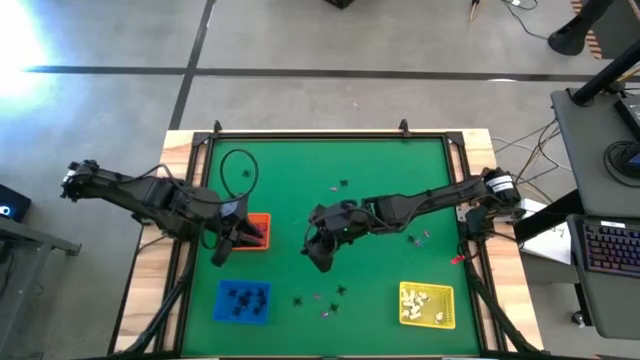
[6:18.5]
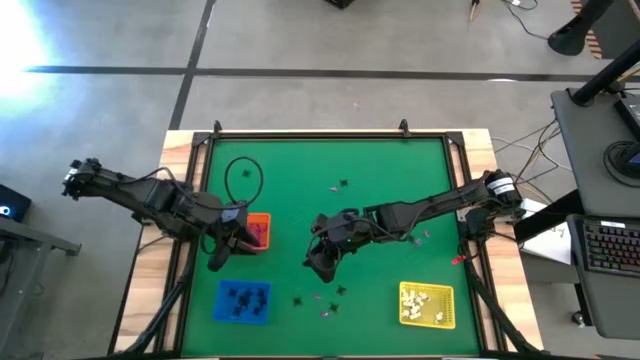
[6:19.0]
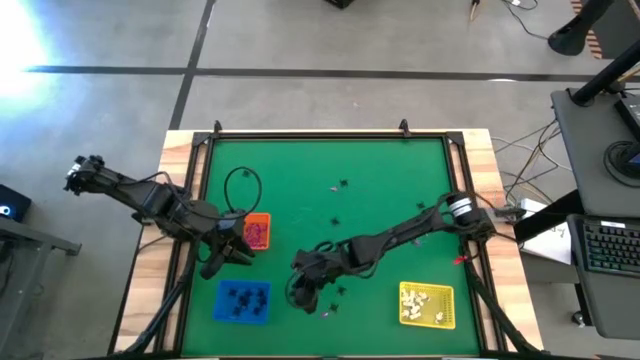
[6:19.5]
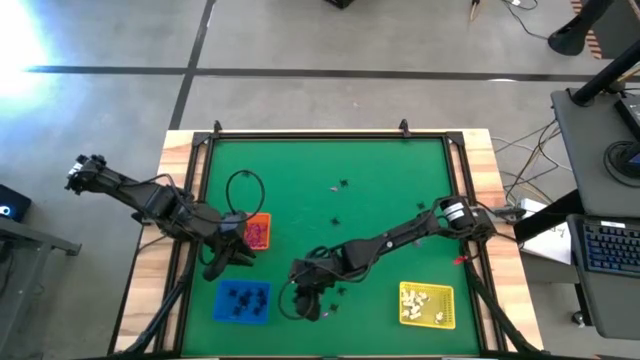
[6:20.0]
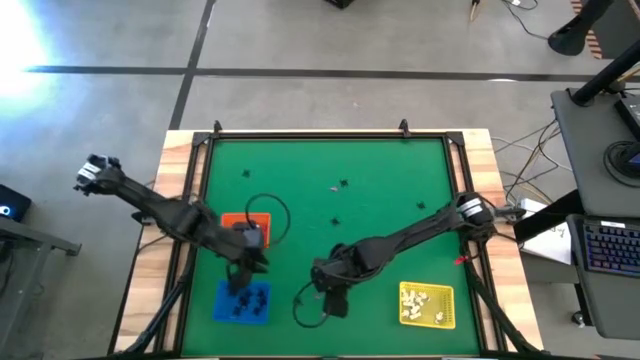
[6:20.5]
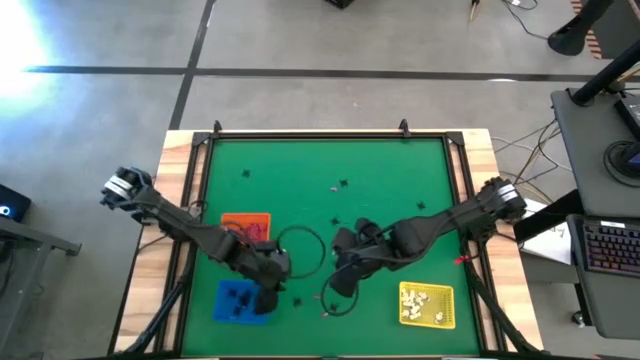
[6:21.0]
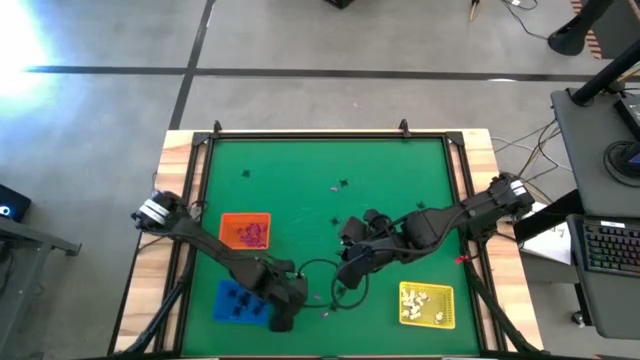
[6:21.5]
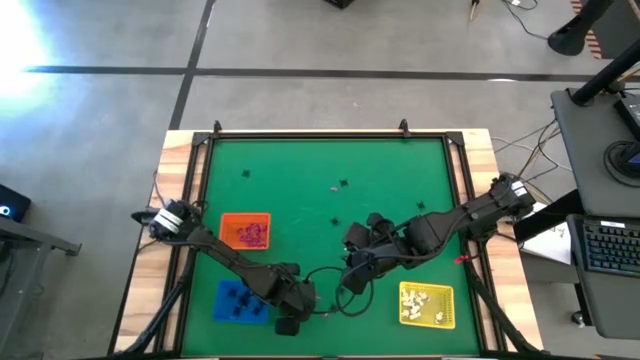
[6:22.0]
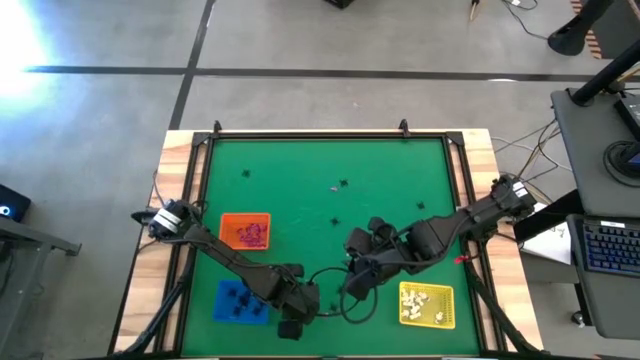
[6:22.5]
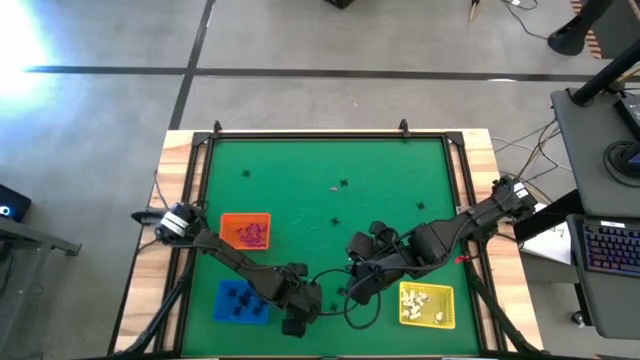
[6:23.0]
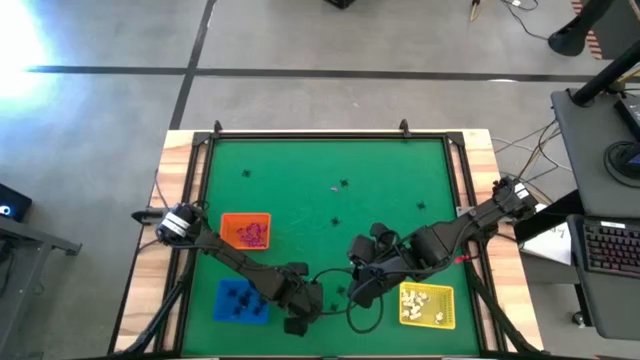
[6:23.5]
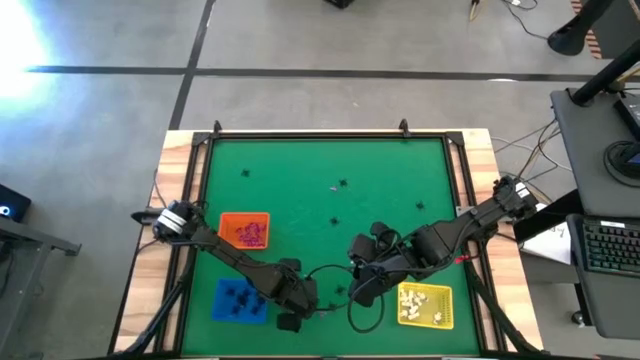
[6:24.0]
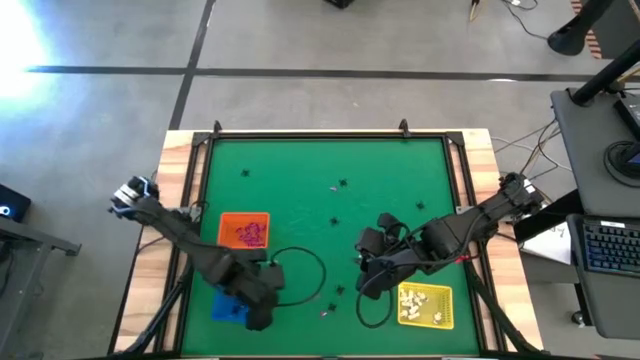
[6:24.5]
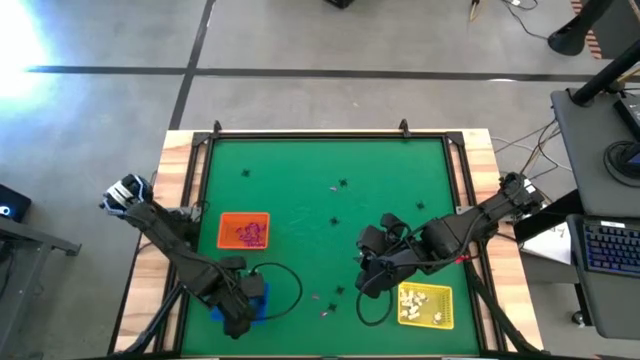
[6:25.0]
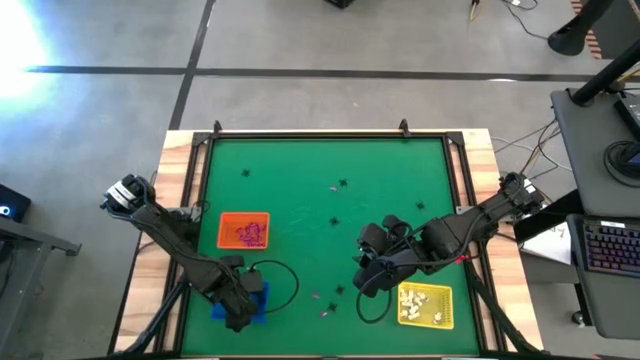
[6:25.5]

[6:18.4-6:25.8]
Task: Sort Halloween decoration
Put the black spider toy into the blue bin

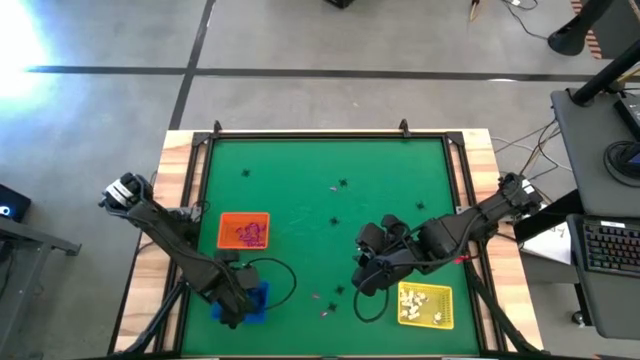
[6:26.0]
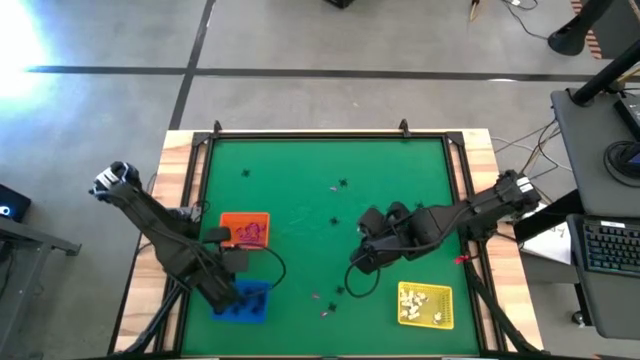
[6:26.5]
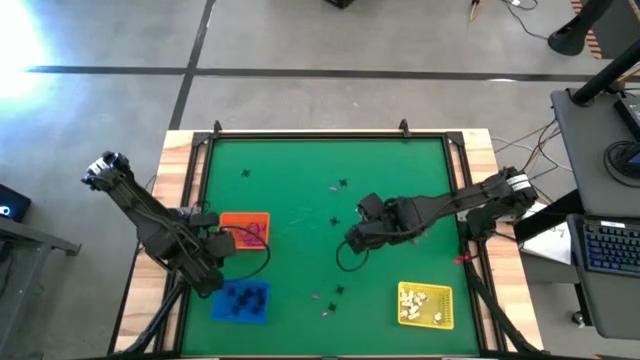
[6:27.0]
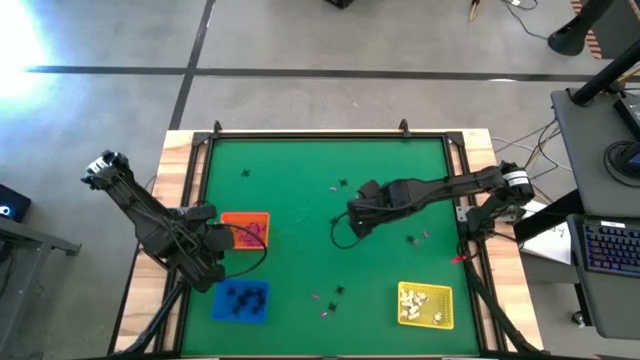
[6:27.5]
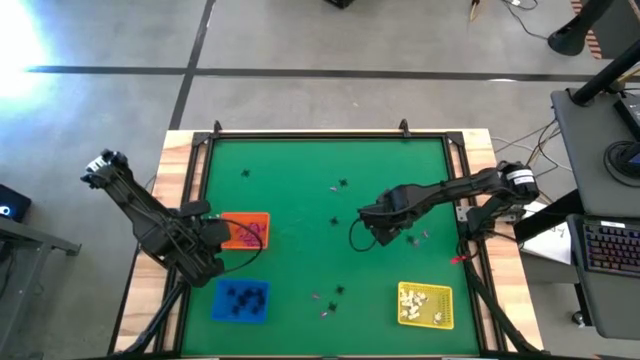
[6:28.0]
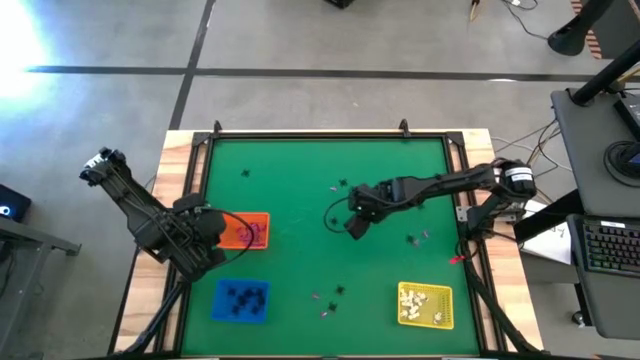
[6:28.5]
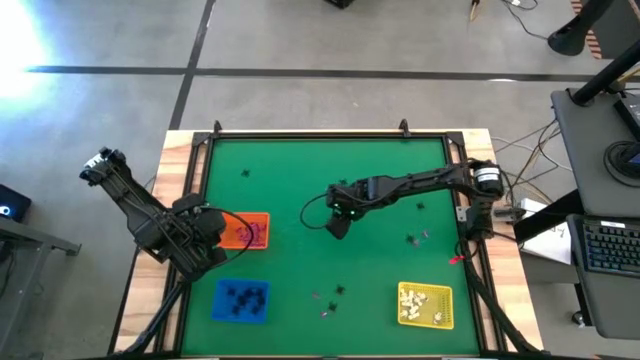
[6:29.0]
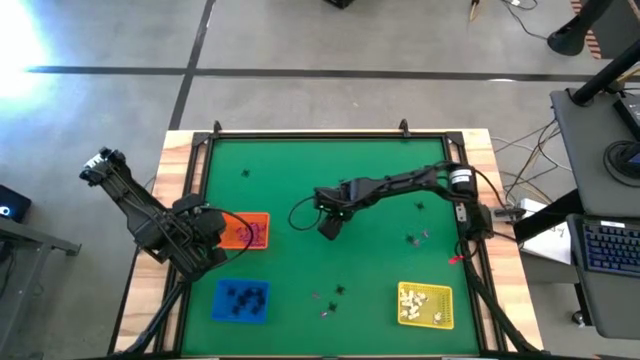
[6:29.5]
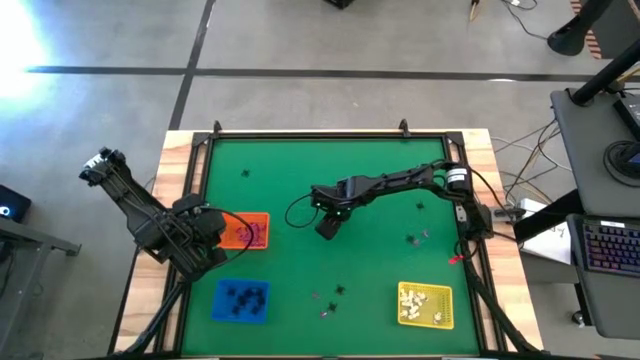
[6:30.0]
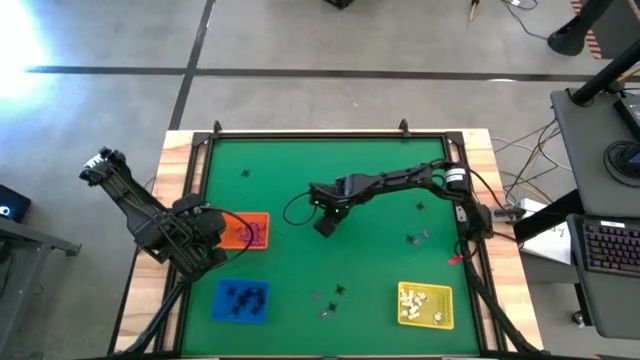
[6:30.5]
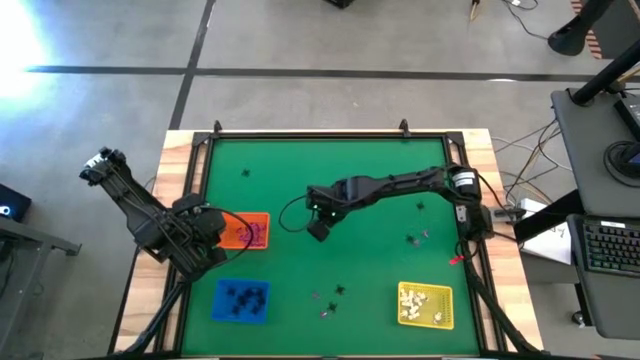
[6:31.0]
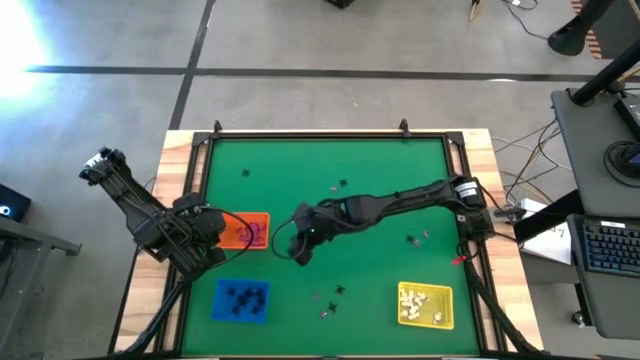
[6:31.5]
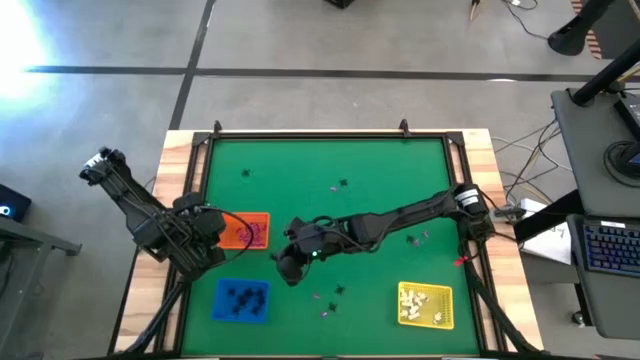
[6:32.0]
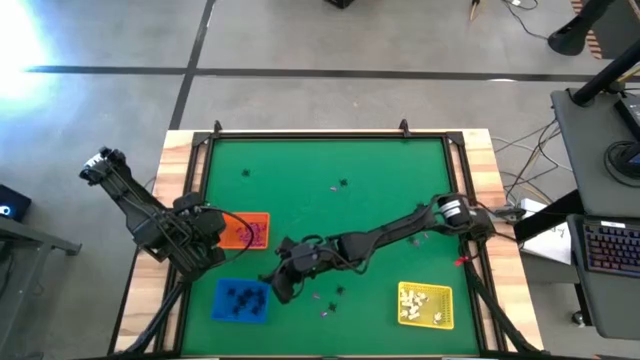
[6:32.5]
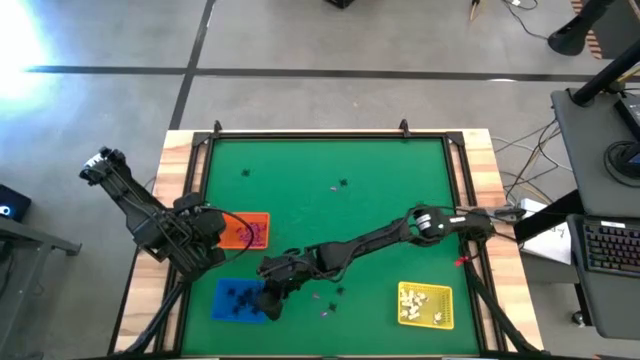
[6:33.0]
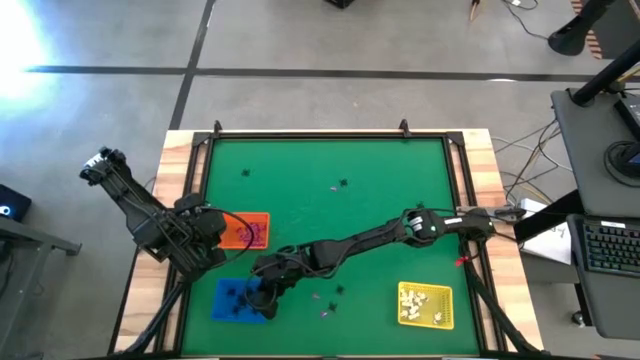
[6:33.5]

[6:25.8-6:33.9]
Put the black spider toy into the blue bin

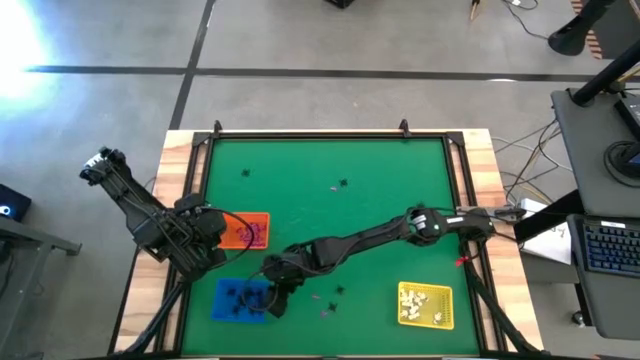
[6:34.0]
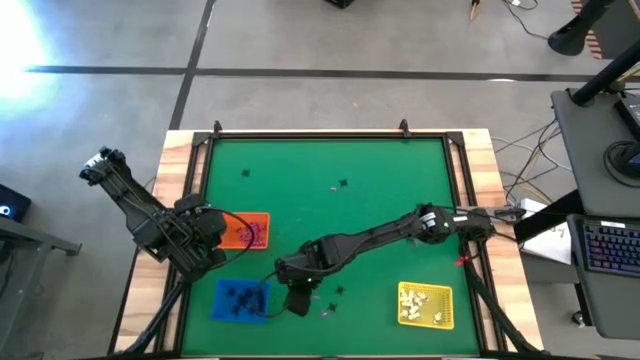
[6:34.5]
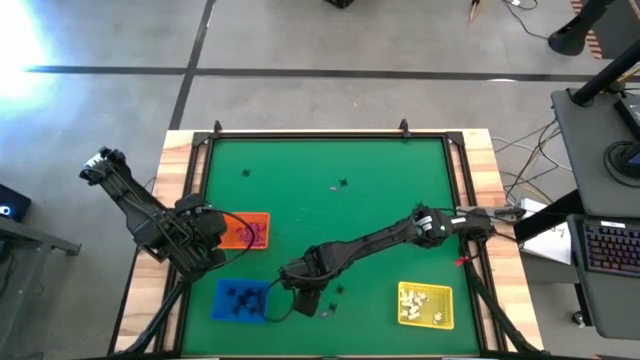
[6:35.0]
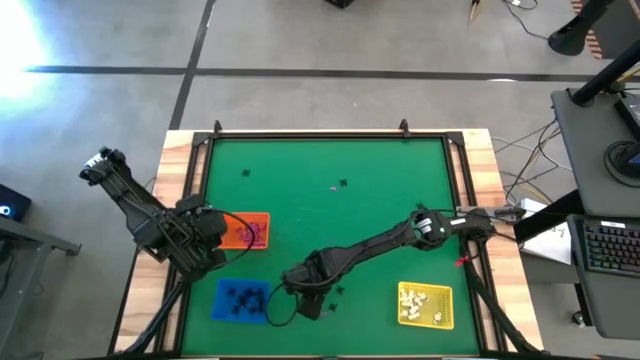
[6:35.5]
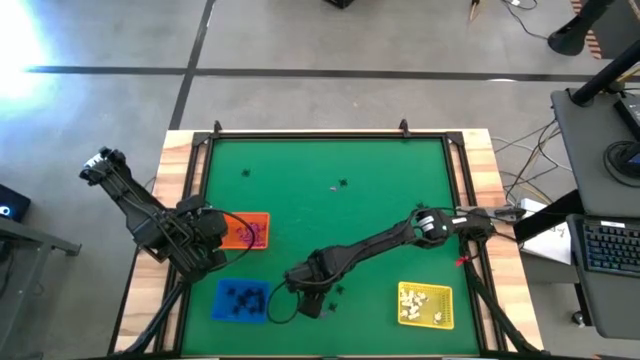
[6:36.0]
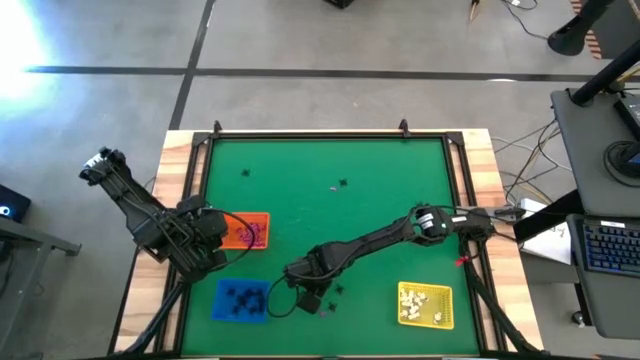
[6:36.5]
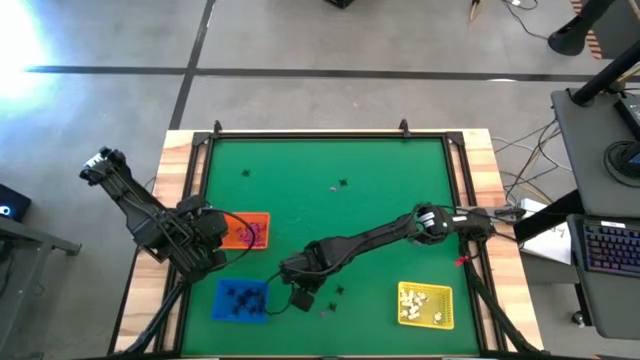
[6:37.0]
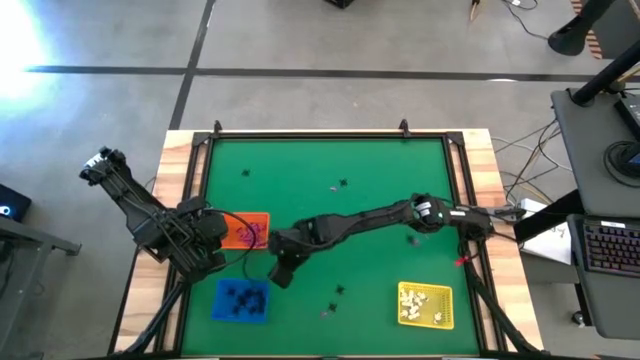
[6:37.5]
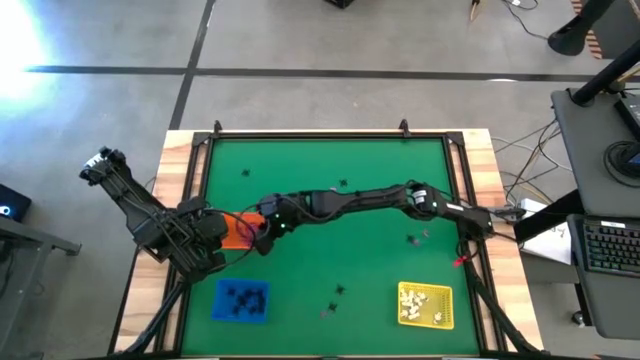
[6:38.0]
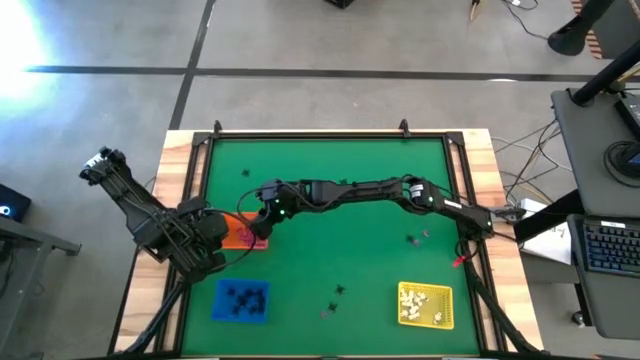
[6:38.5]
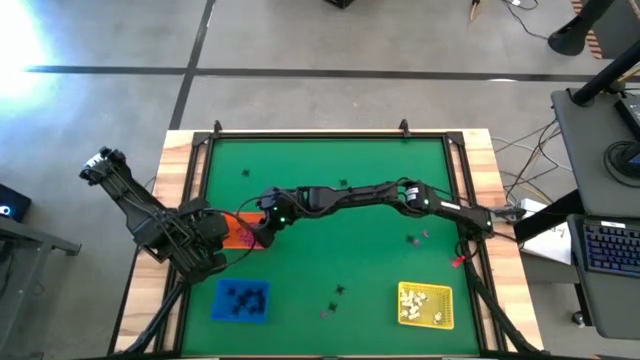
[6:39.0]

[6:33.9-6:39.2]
Put the violet witch hat toy into the orange bin

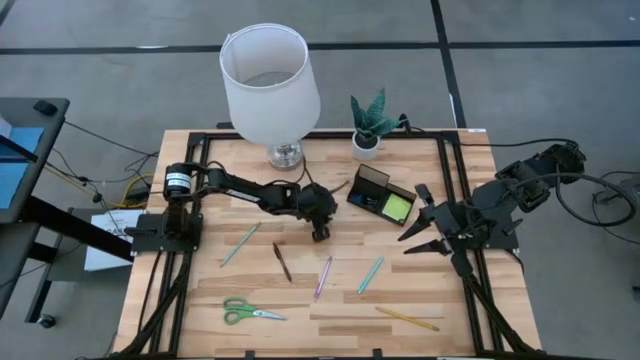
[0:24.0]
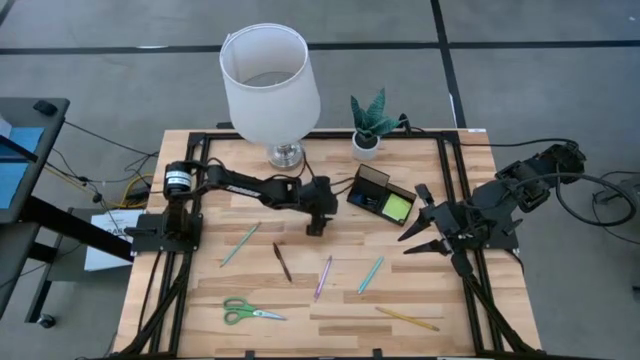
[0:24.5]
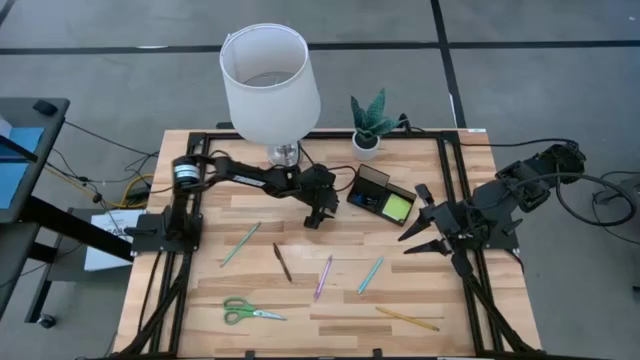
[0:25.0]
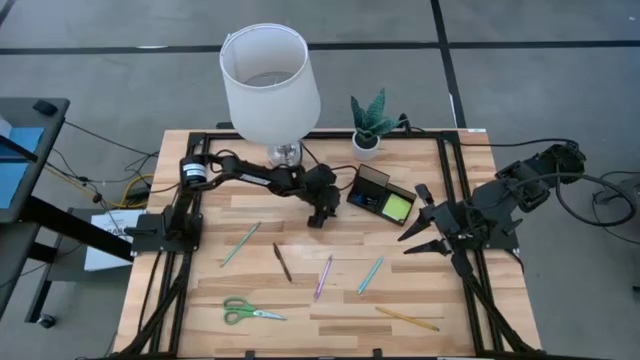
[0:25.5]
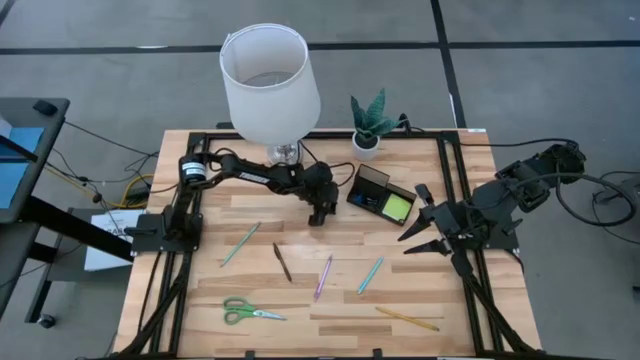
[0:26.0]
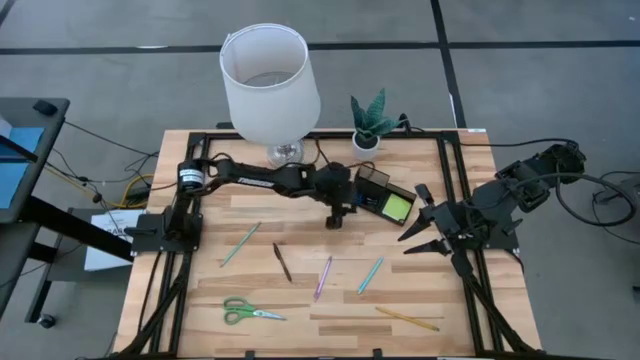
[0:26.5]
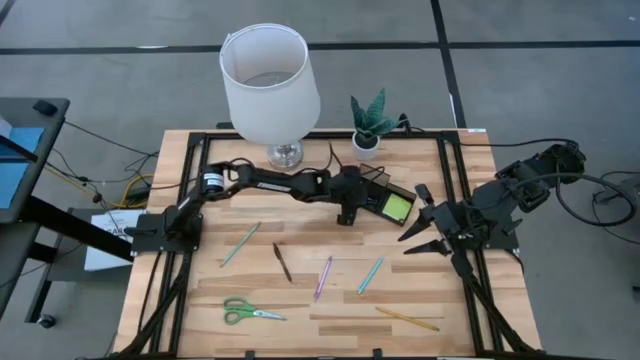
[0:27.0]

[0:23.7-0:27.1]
Task: Pick and place office supplies into organizer
Put the black binder clip into the black organizer
